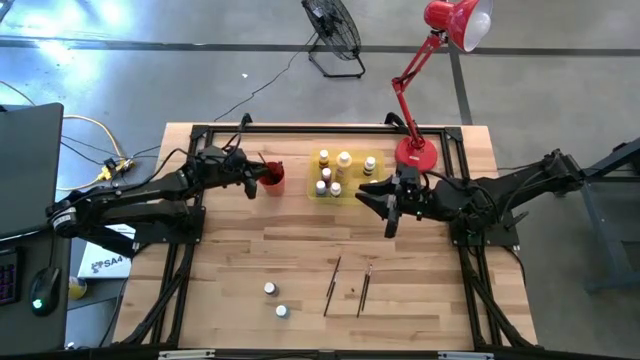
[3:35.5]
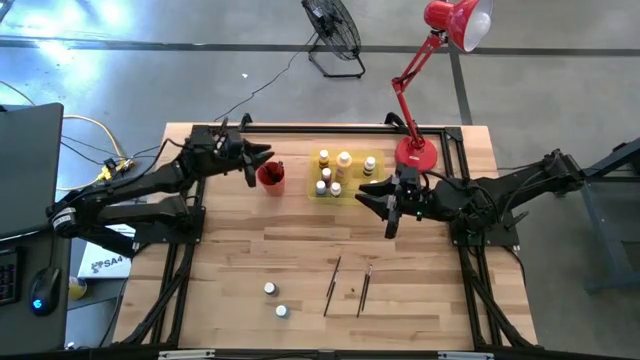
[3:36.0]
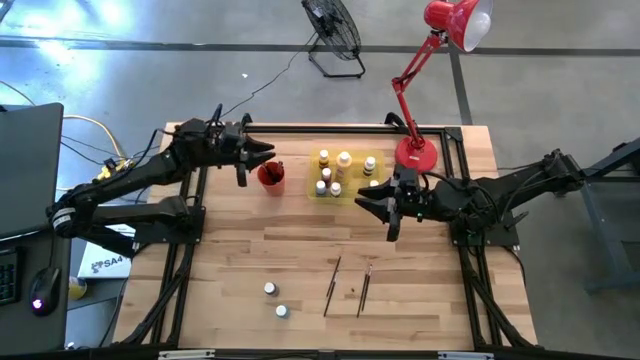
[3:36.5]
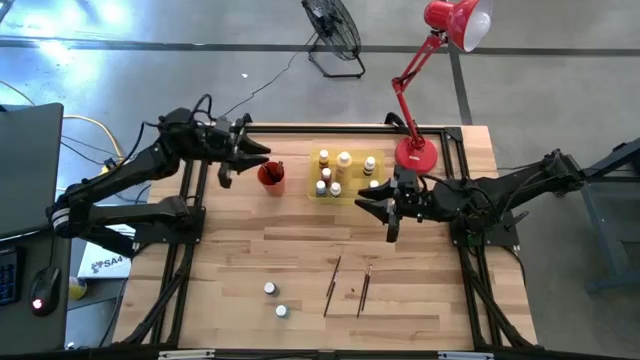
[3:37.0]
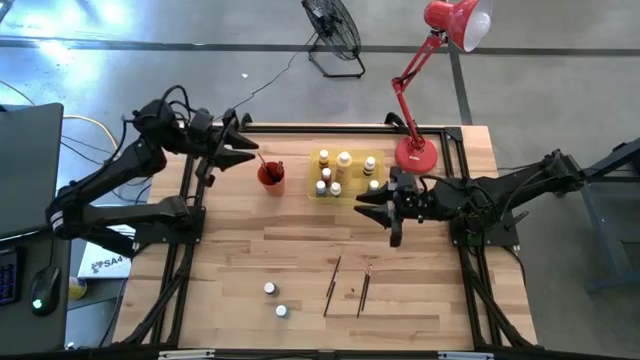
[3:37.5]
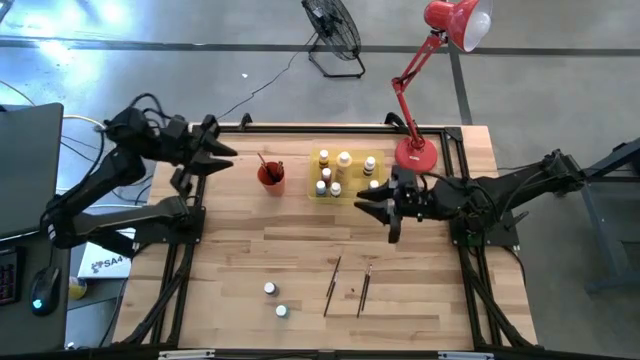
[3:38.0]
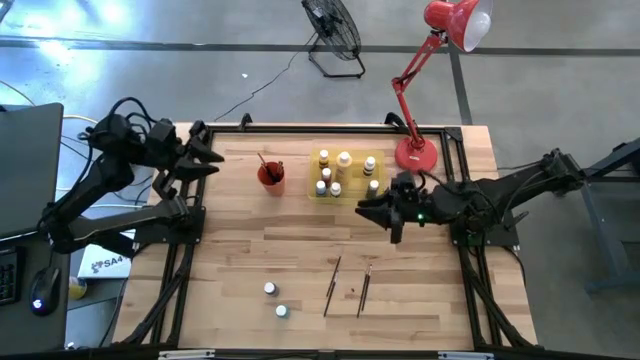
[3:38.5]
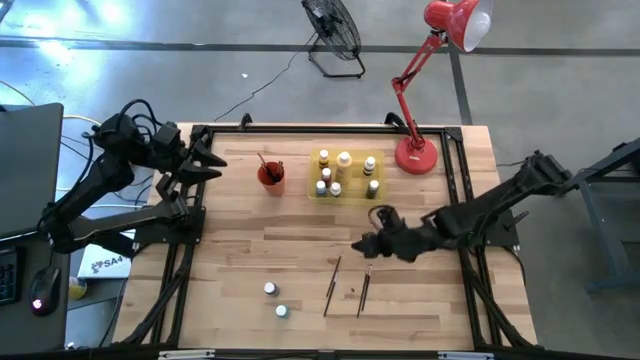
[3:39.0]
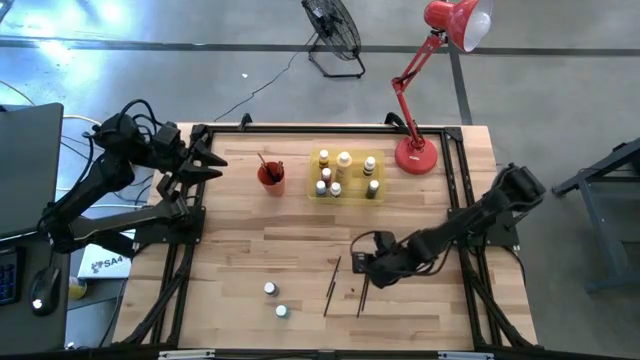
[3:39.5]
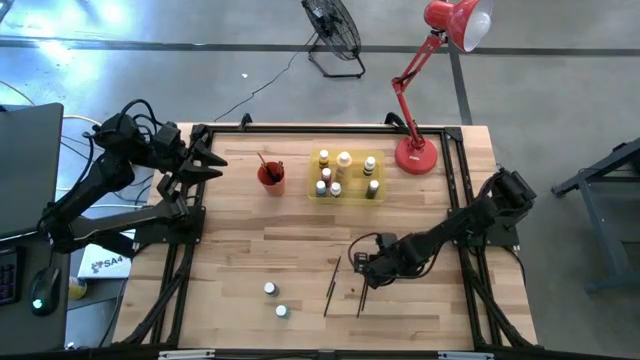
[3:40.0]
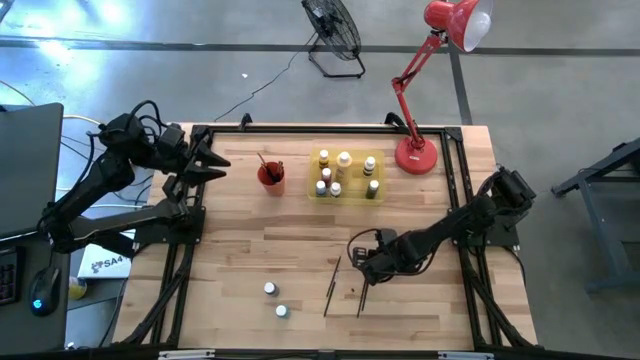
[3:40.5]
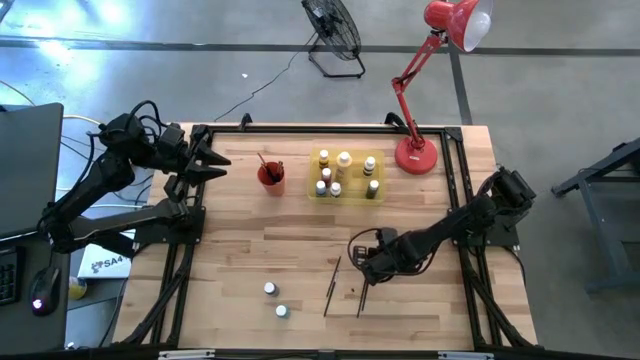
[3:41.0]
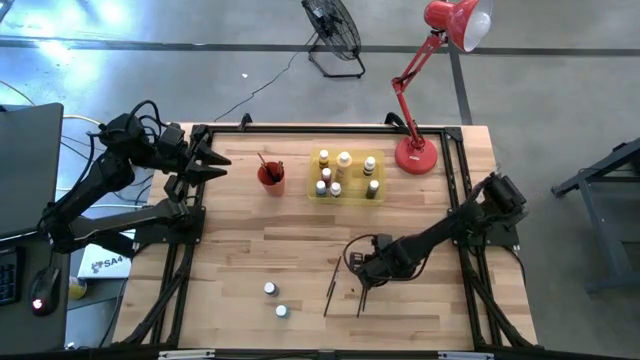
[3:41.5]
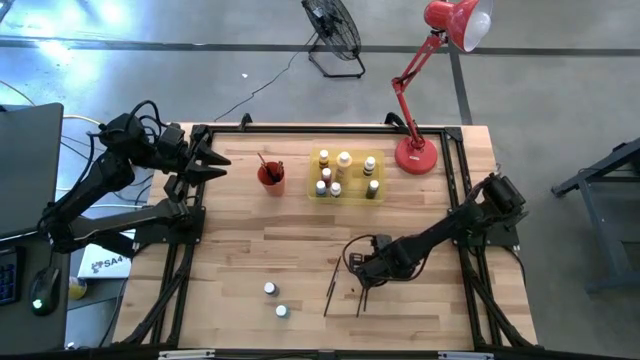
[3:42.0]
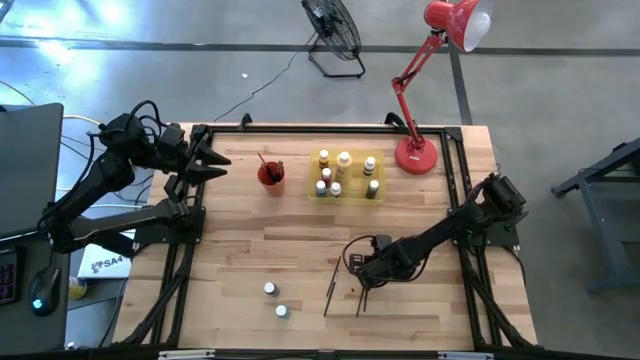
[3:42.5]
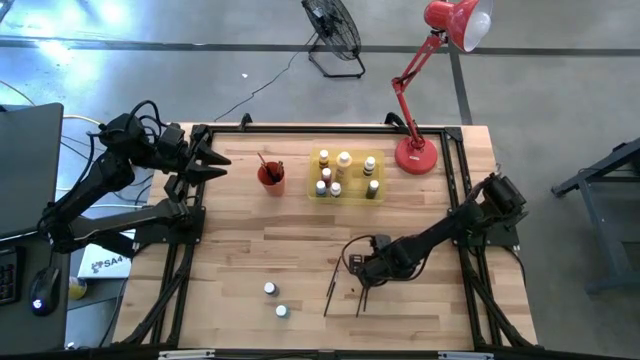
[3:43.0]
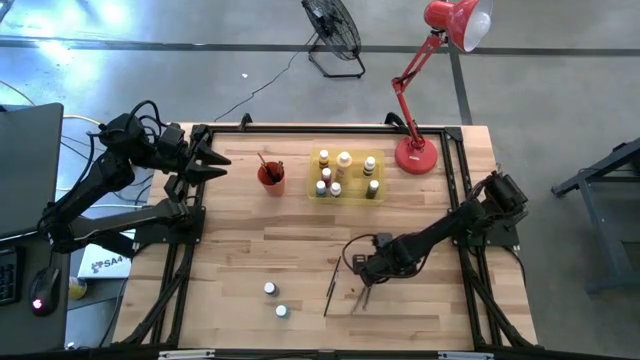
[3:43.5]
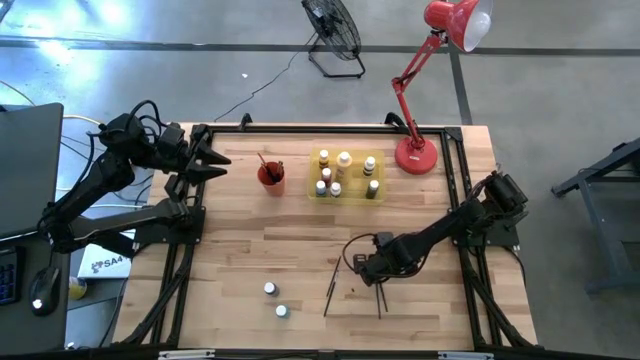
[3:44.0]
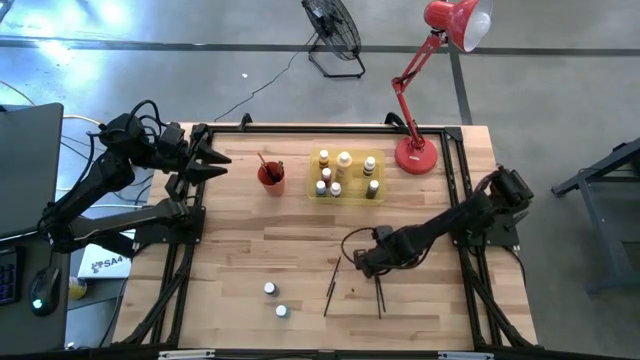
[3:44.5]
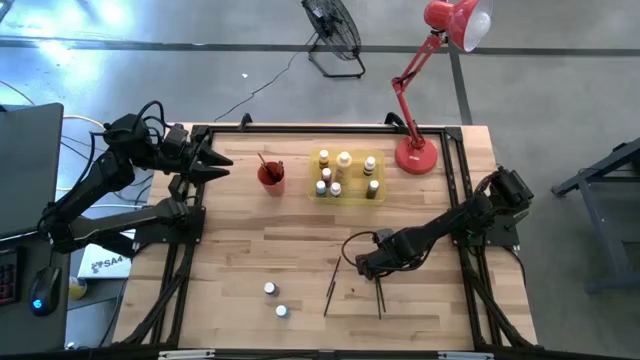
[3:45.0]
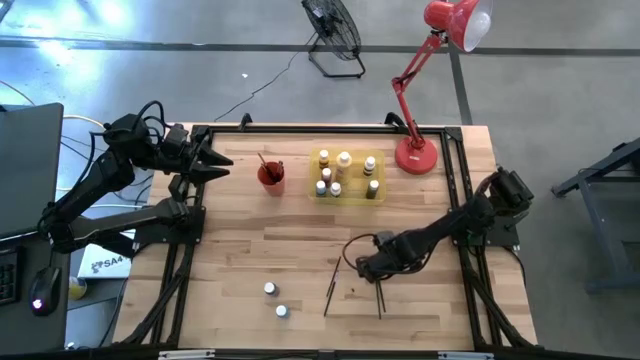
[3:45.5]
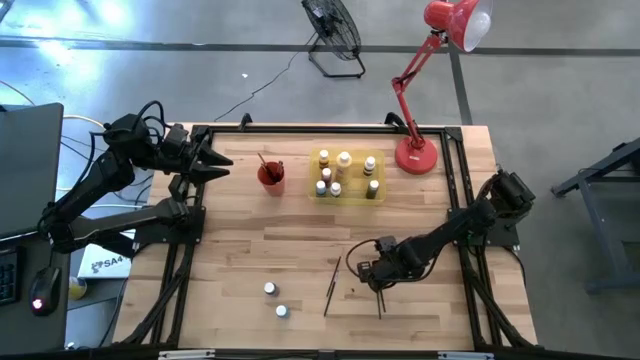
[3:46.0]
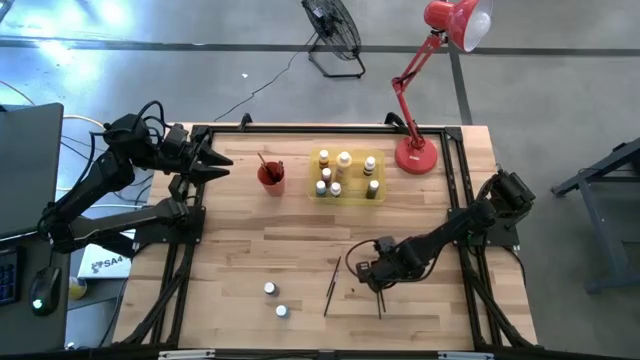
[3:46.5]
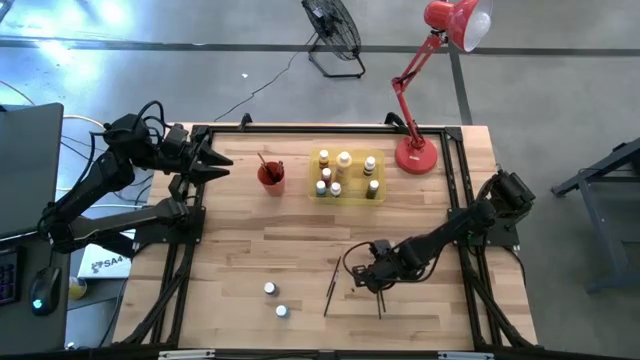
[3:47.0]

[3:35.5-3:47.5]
Task: Pick & Place Paint Supplies
Put the orange paintbrush into the orange cup

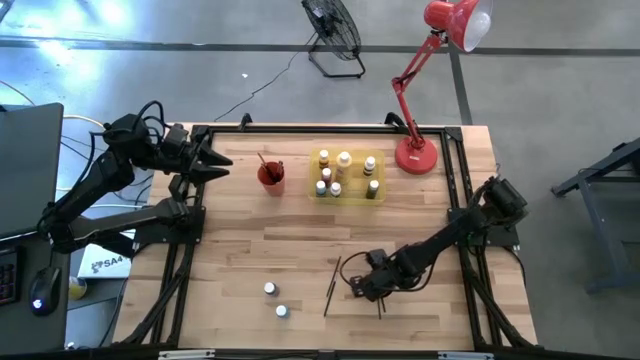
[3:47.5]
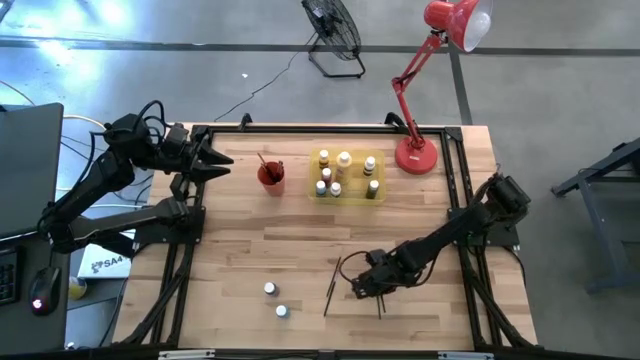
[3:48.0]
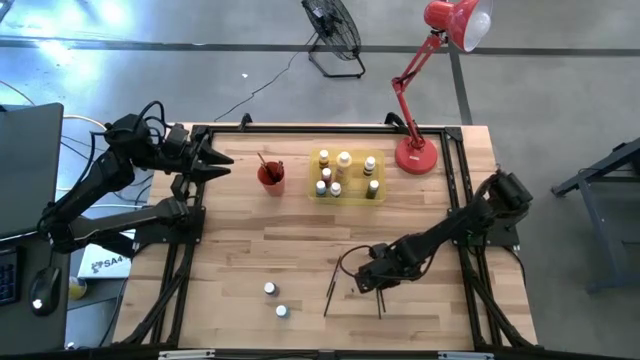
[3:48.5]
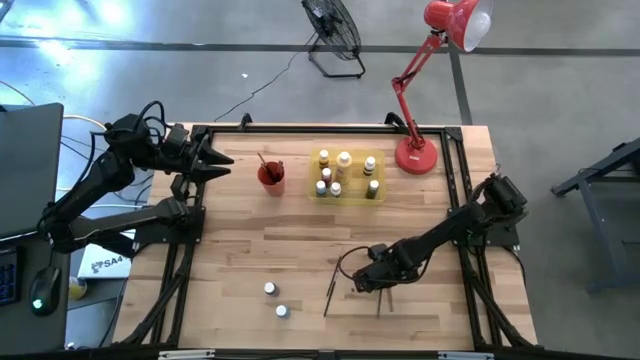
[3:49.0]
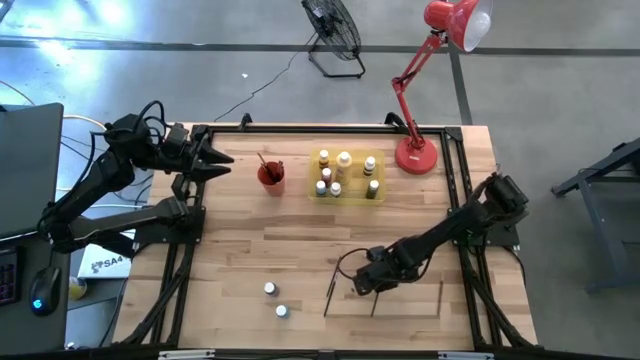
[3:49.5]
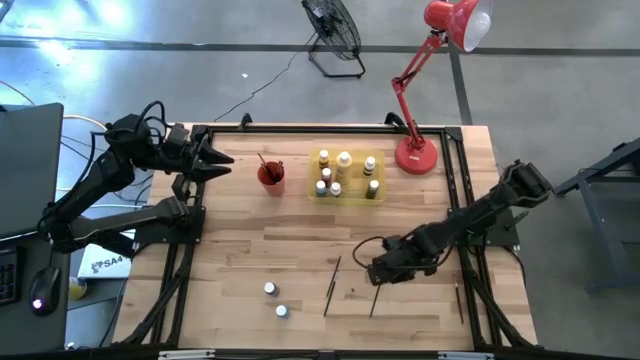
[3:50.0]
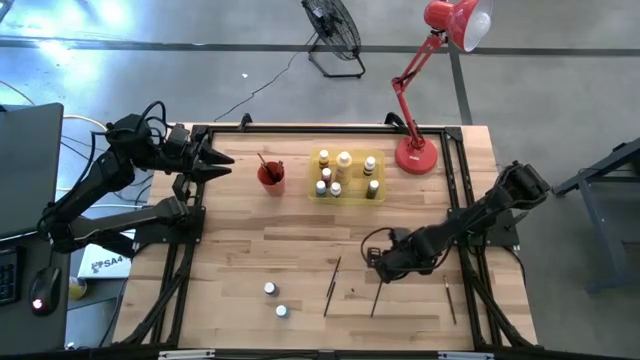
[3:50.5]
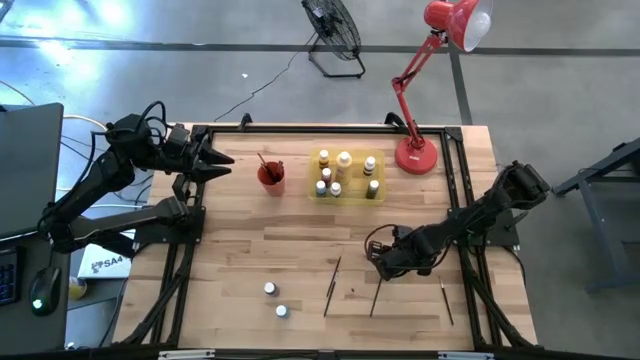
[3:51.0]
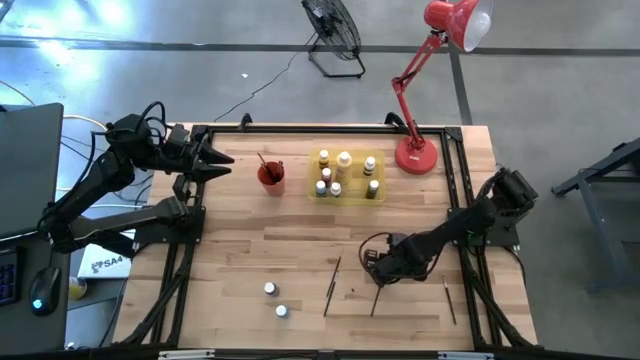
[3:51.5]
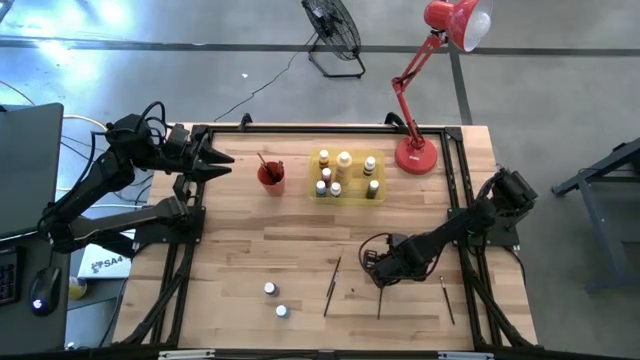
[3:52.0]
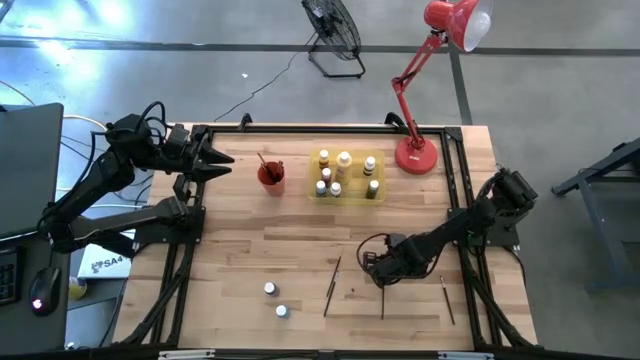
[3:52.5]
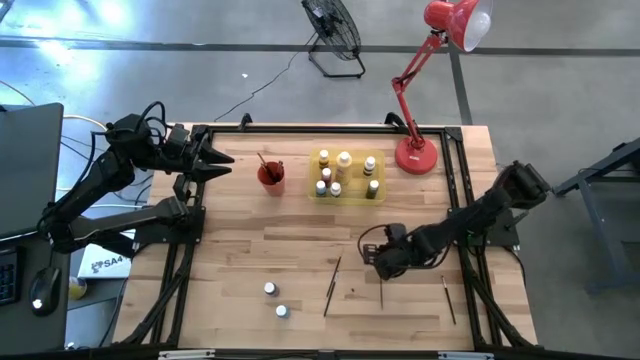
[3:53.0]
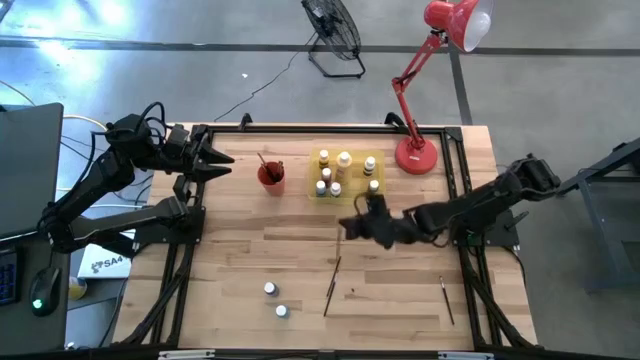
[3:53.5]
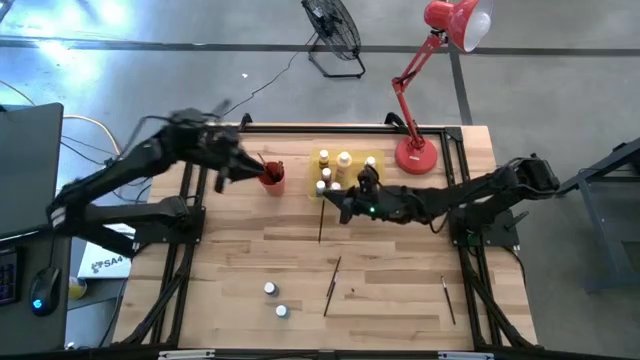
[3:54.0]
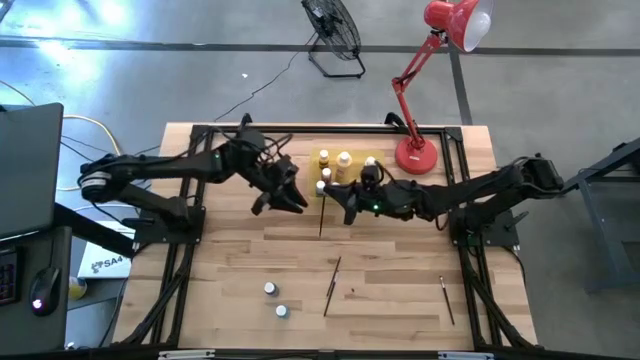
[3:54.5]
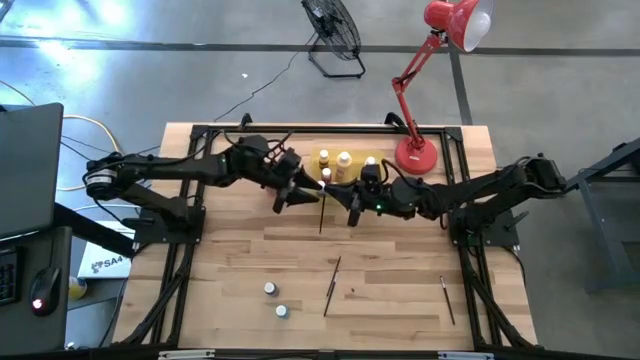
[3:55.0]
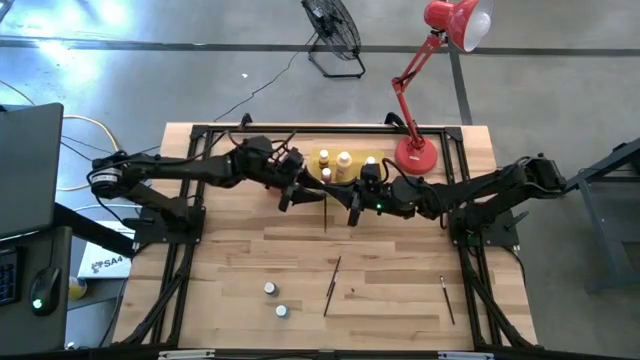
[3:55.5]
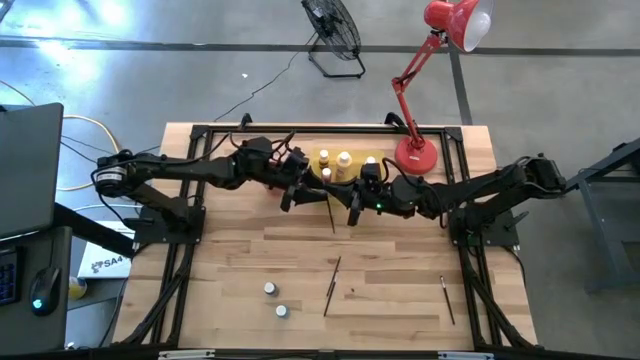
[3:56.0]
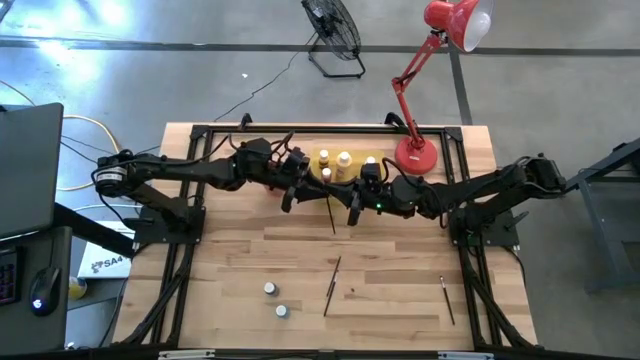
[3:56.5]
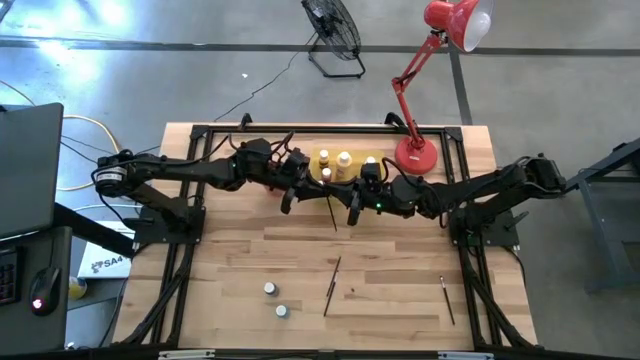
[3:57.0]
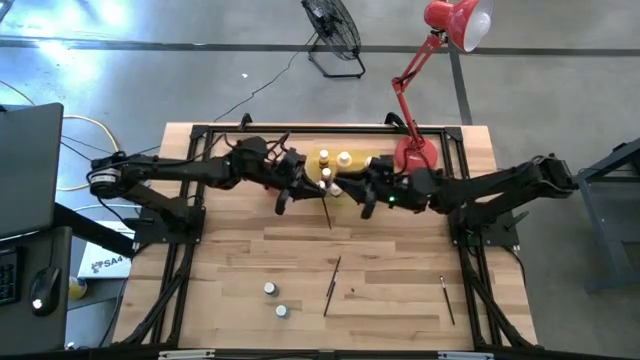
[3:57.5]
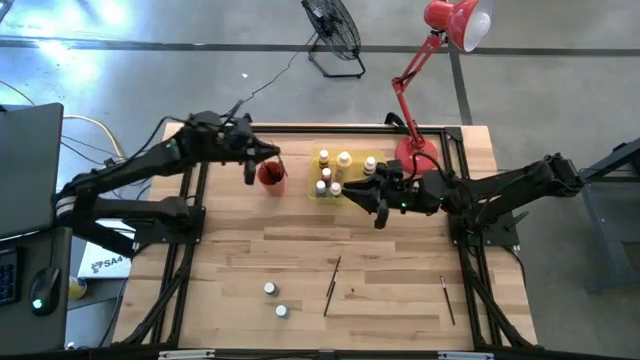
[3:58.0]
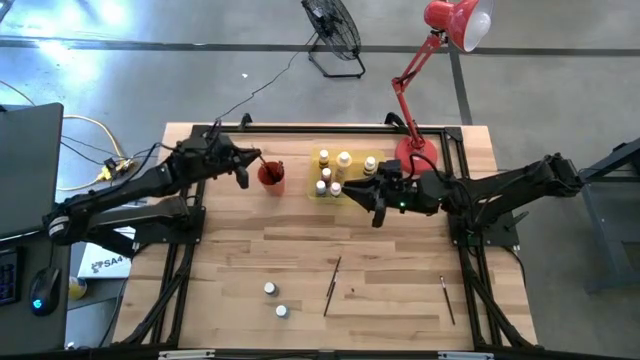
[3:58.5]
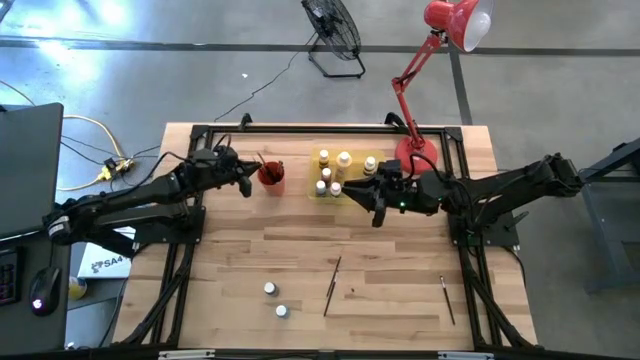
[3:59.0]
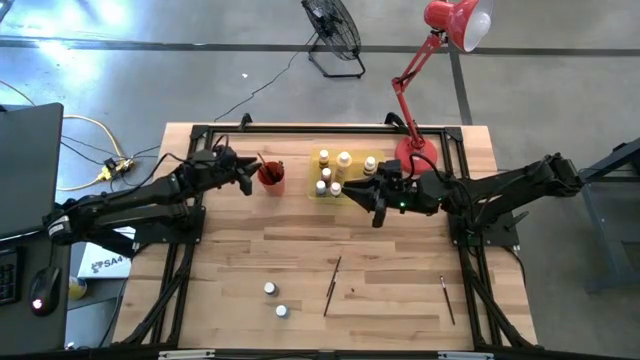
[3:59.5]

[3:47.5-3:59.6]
Put the orange paintbrush into the orange cup
